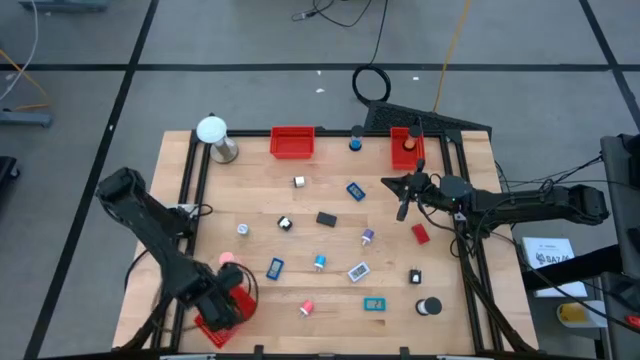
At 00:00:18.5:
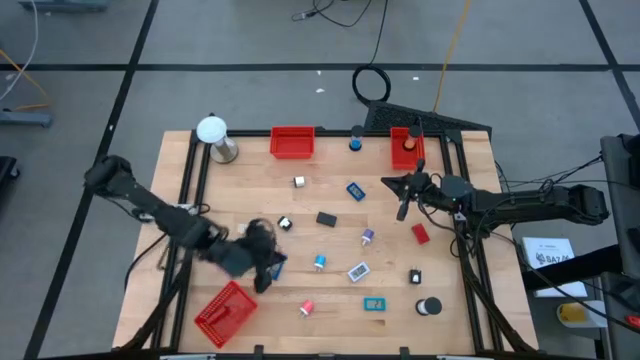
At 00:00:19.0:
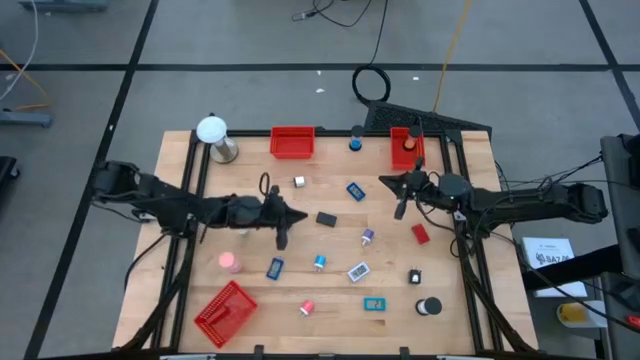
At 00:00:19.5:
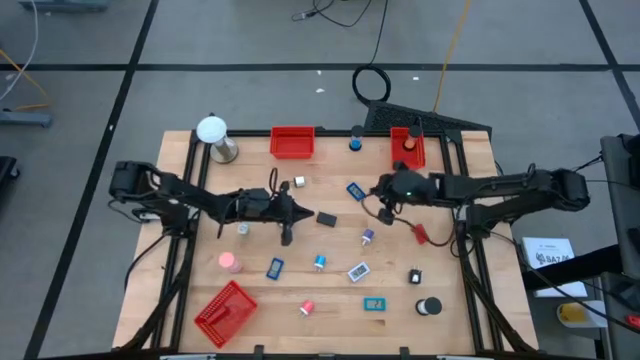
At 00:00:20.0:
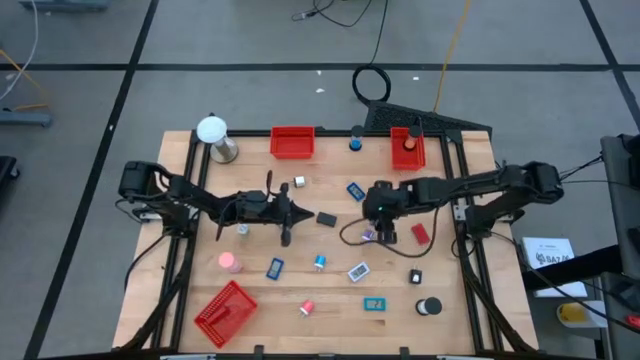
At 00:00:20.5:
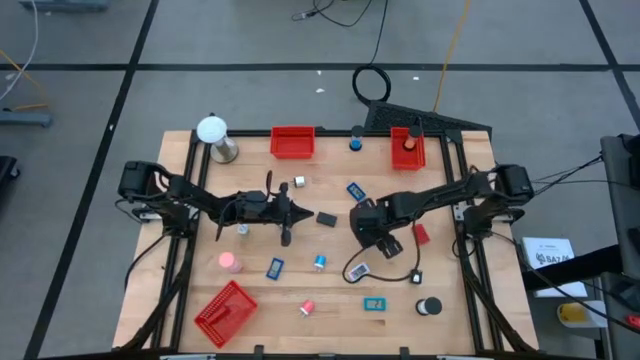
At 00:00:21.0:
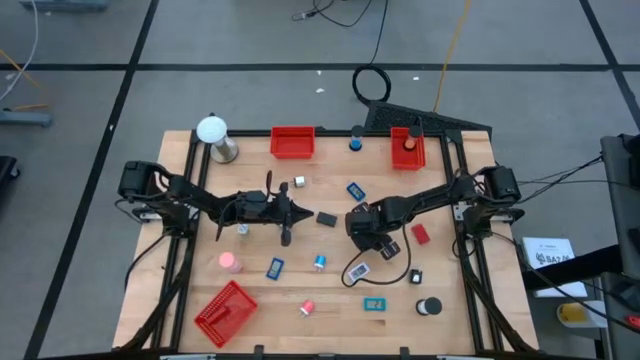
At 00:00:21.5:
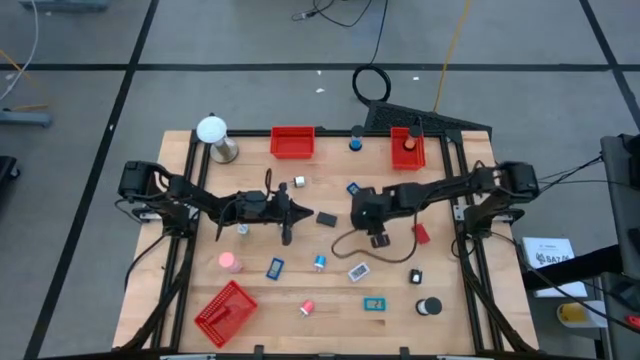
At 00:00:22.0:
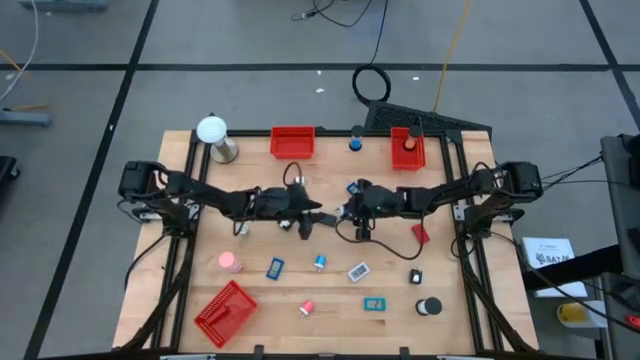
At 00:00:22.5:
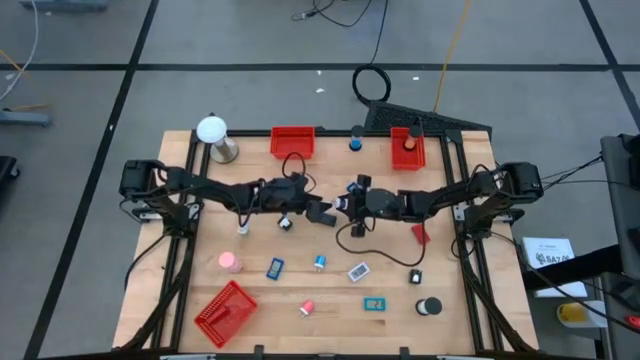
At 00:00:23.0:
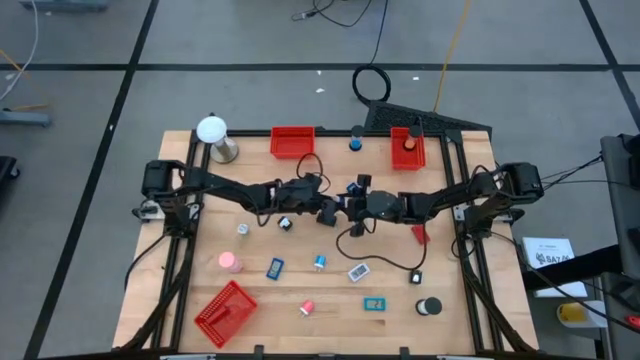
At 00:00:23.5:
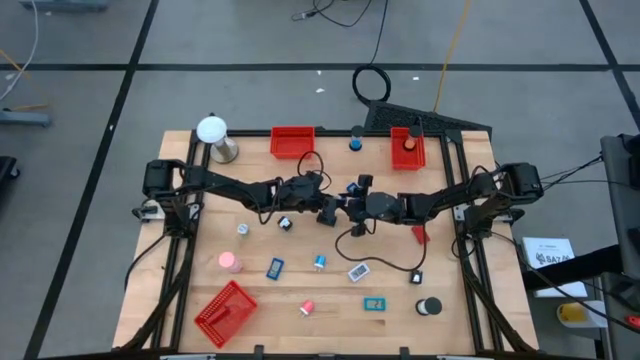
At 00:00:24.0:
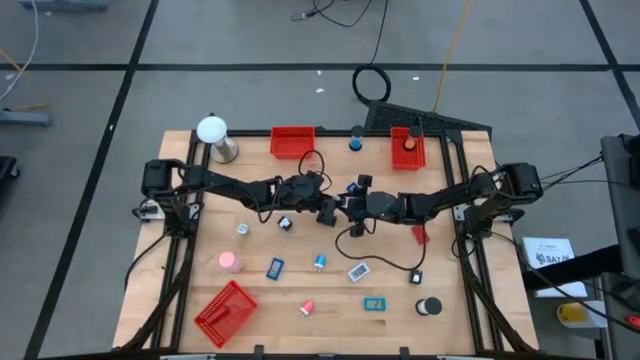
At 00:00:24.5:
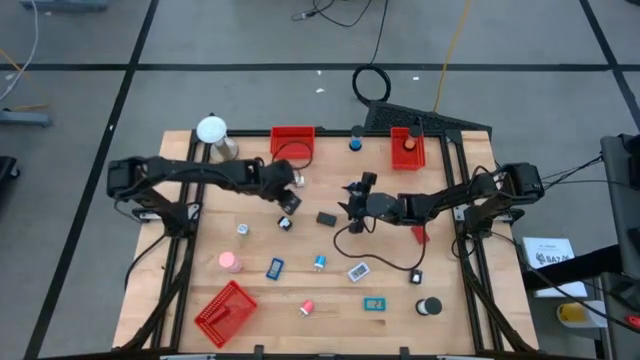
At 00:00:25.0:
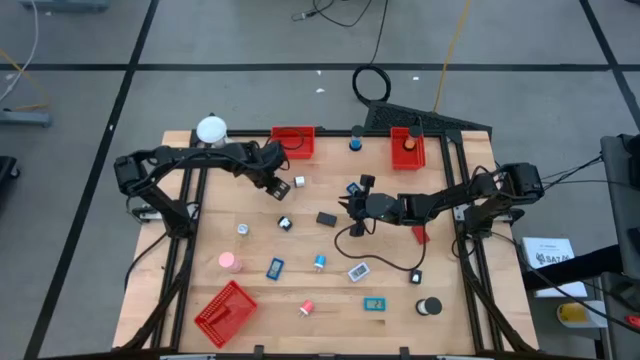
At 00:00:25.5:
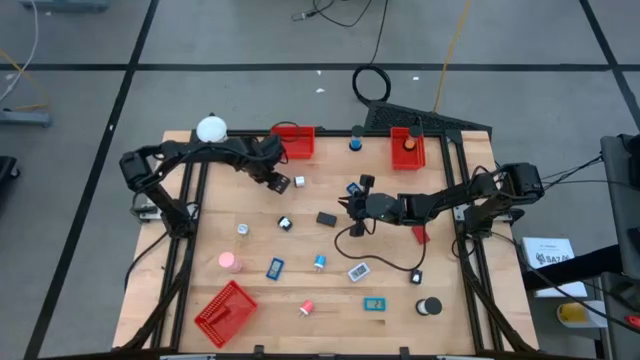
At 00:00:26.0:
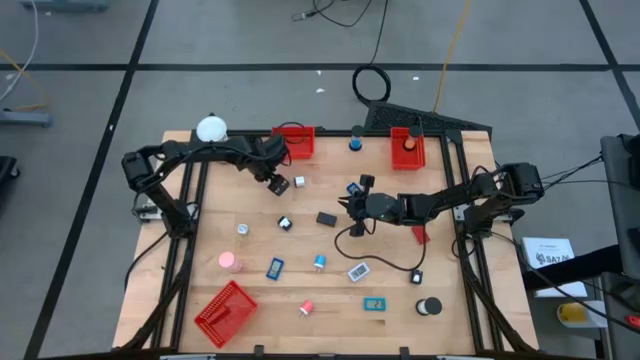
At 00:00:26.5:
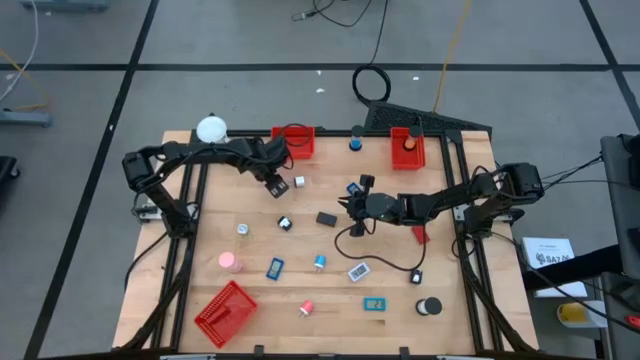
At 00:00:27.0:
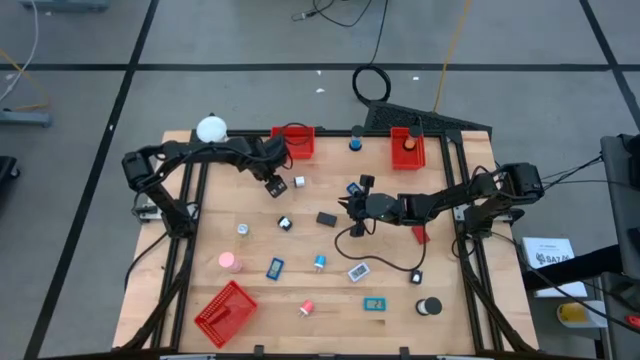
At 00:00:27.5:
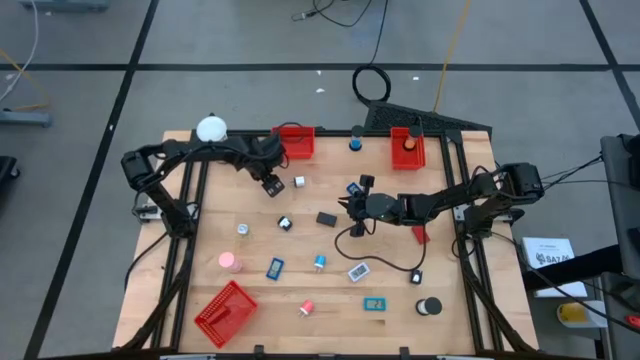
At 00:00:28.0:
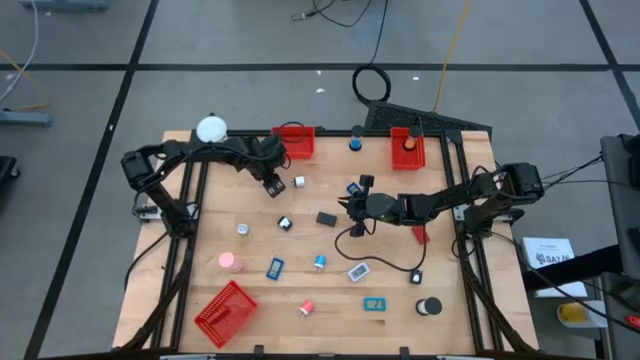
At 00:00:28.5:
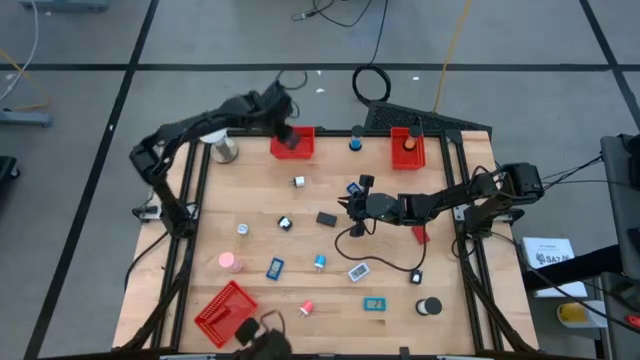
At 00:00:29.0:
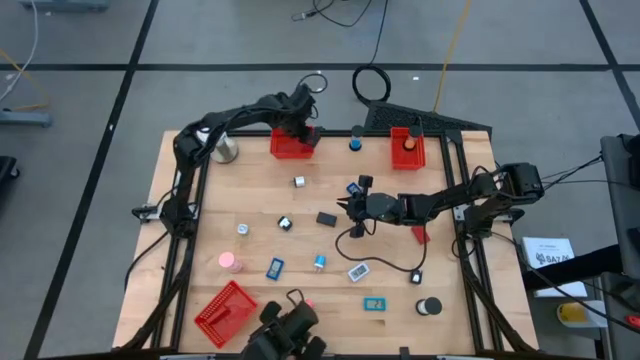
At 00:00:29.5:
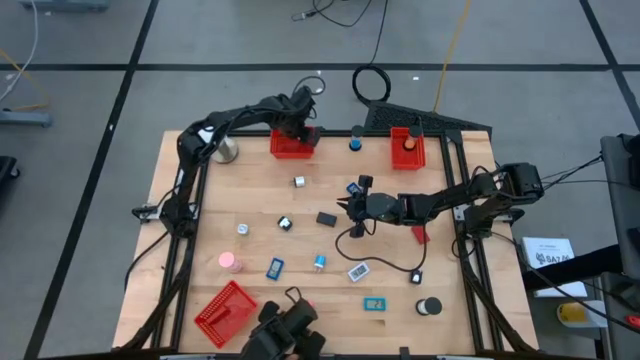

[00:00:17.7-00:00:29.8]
Task: Pick & Place Office items
Put the purple charger adapter into the top left red basket

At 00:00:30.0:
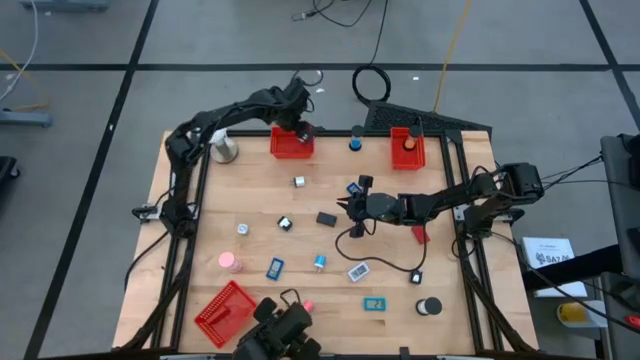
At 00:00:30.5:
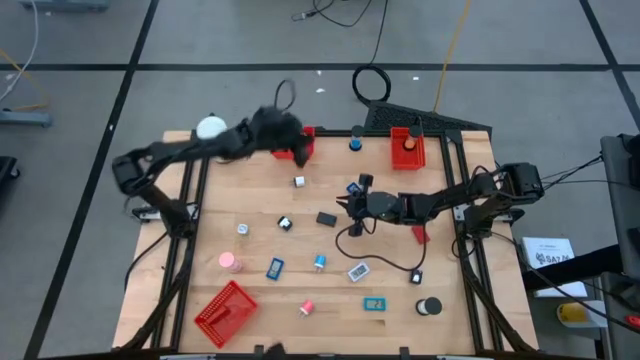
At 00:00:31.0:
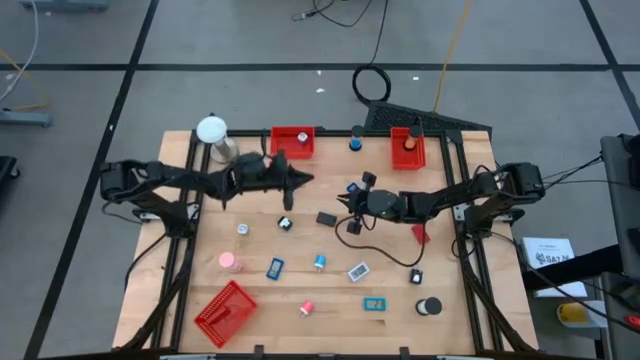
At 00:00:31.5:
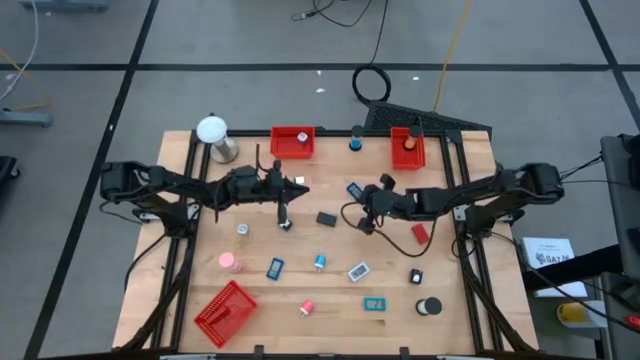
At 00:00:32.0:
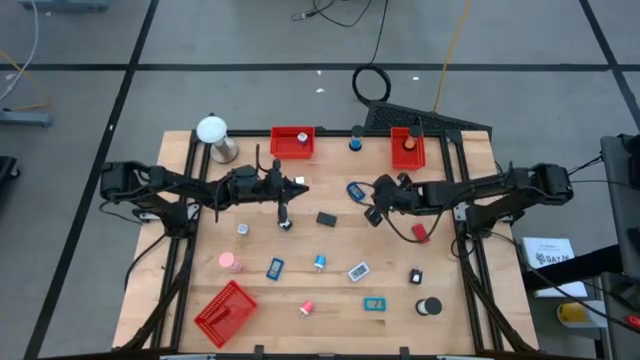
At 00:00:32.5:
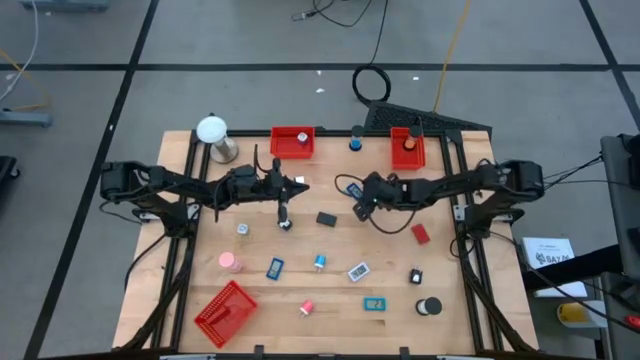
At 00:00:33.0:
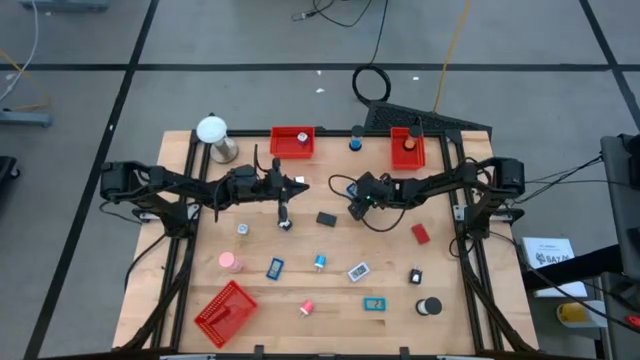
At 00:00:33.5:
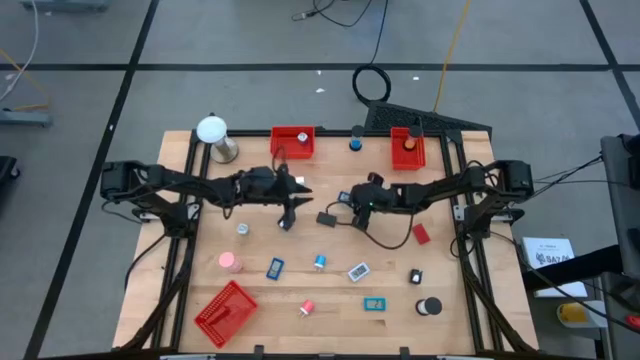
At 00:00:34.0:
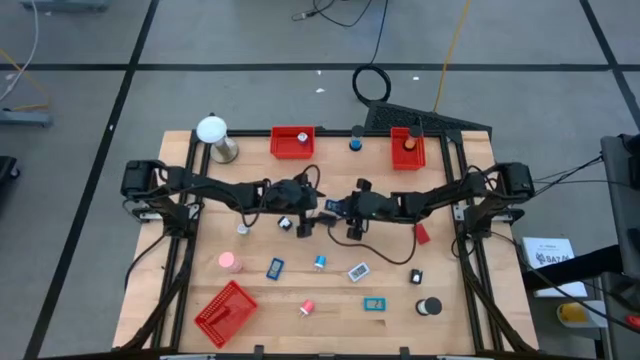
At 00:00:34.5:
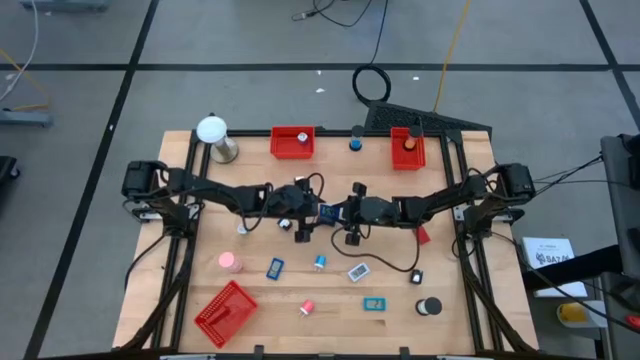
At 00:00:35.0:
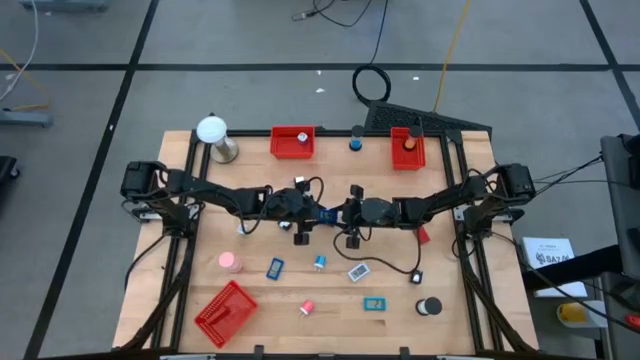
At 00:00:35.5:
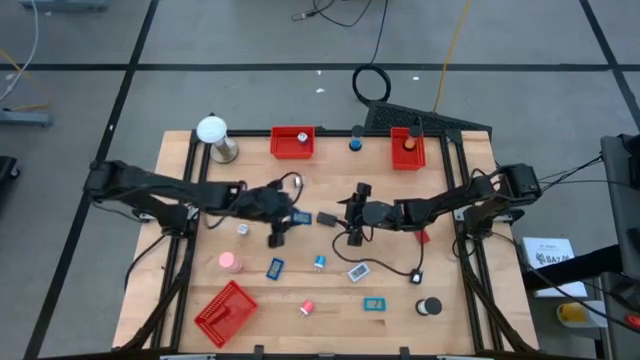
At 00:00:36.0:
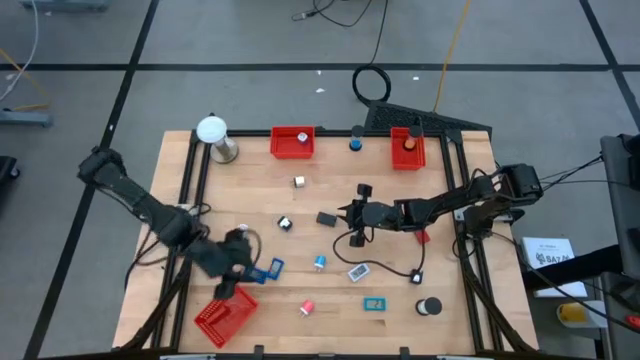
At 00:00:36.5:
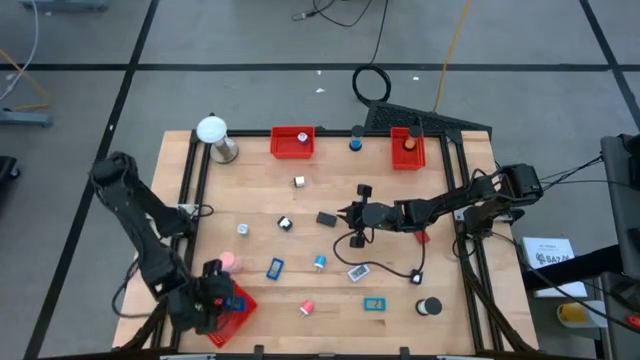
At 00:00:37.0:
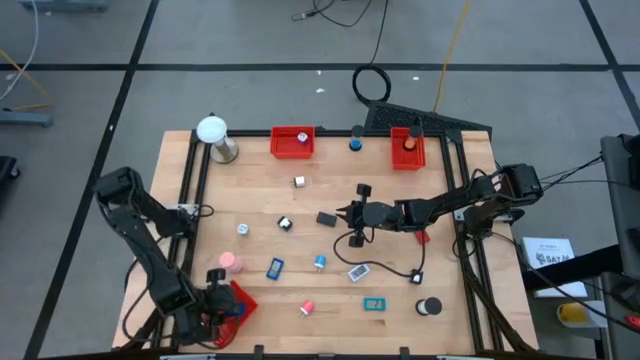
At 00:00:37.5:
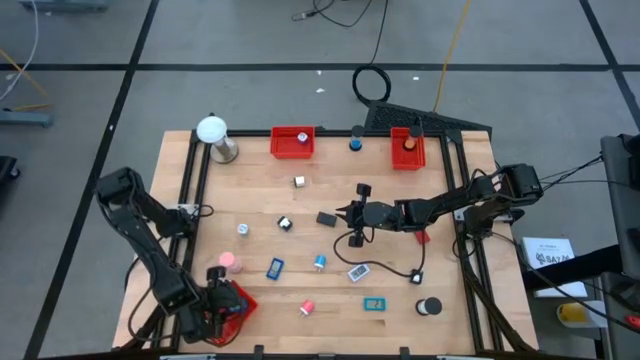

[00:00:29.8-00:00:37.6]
Put the top dark blue timer into the bottom red basket

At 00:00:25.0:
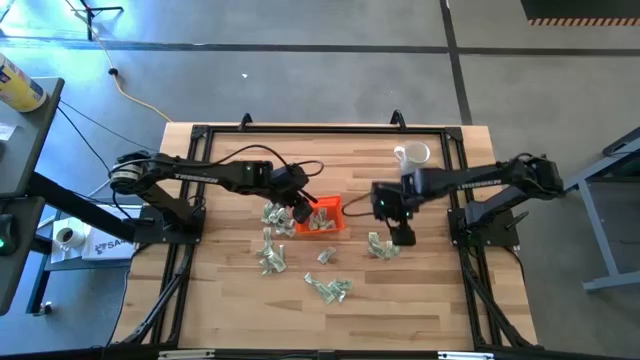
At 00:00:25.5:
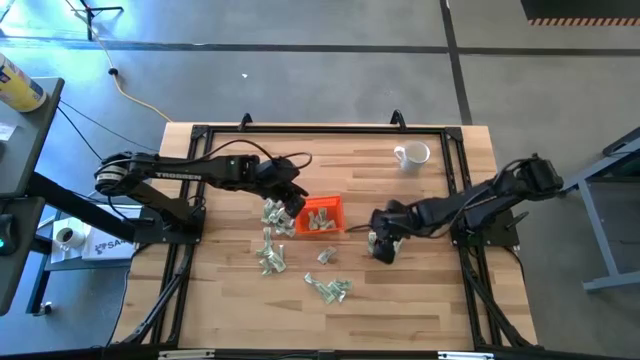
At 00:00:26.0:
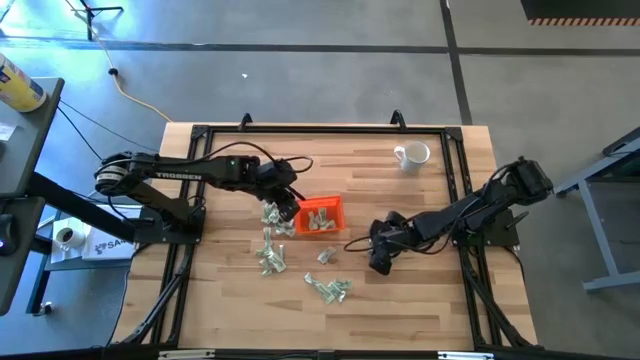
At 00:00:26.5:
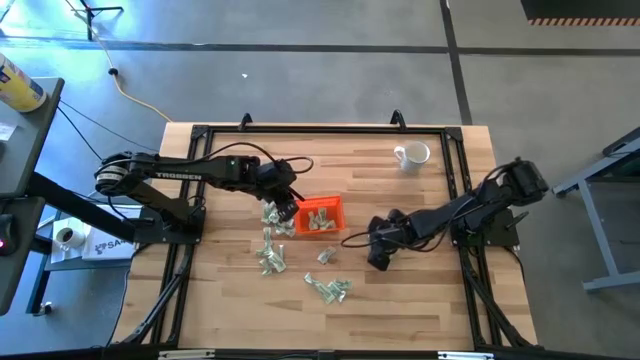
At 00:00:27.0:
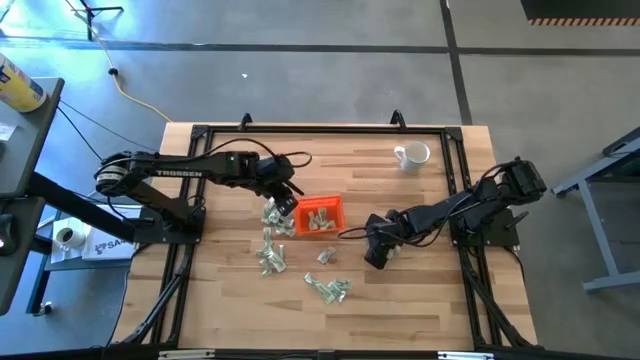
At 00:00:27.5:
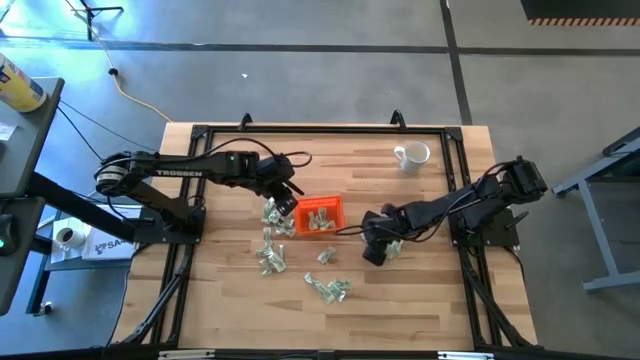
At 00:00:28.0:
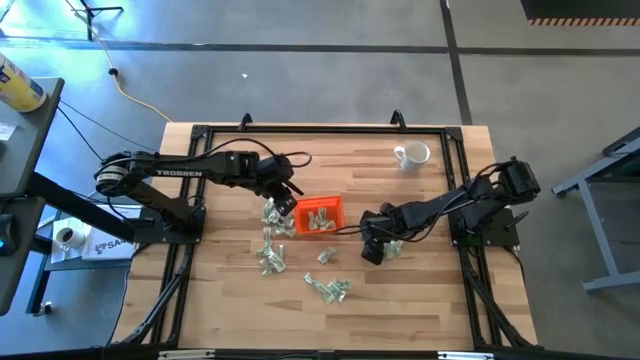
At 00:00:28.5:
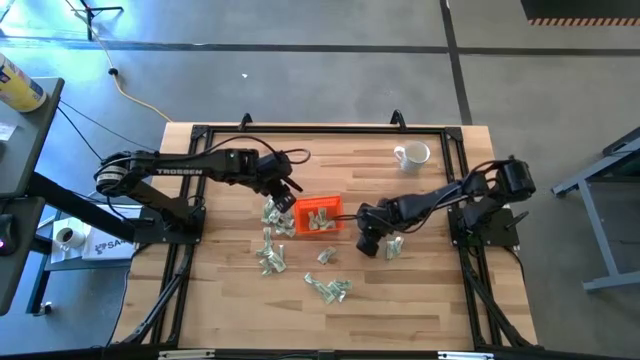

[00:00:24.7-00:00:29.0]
Task: Pick and place Stevia / Truvia into bins
Put the stevia packet into the orange bin
